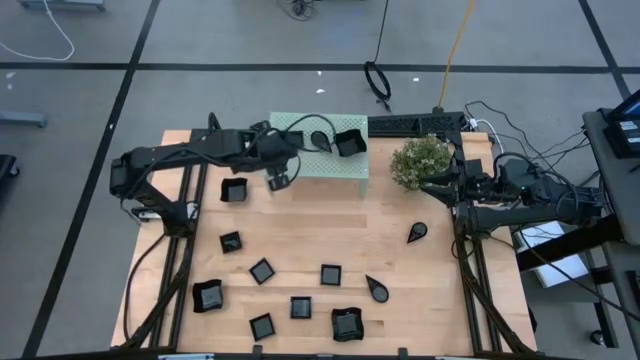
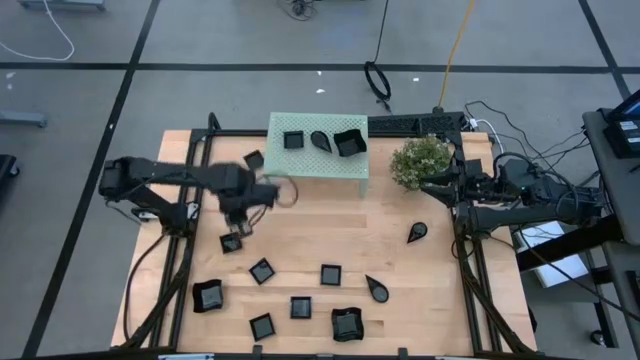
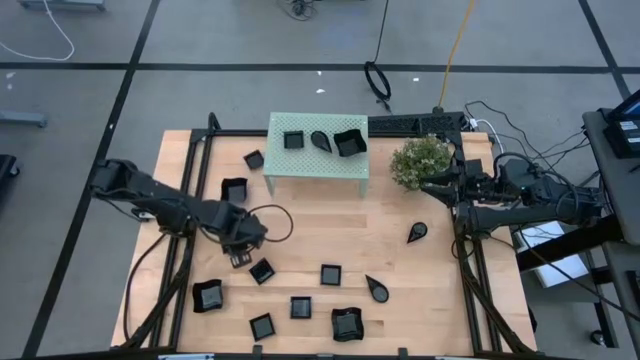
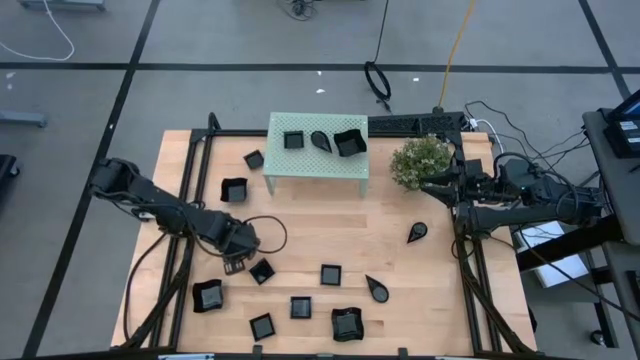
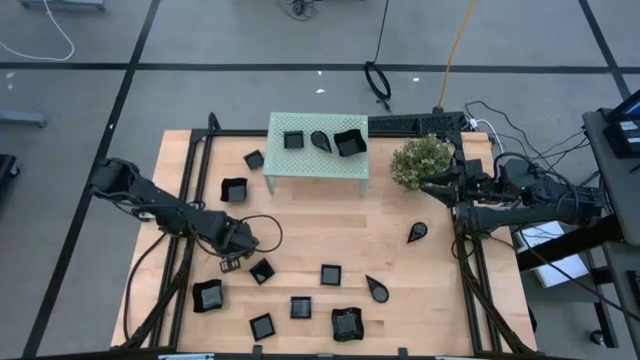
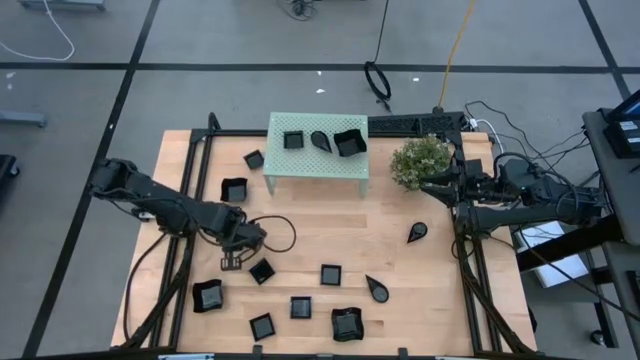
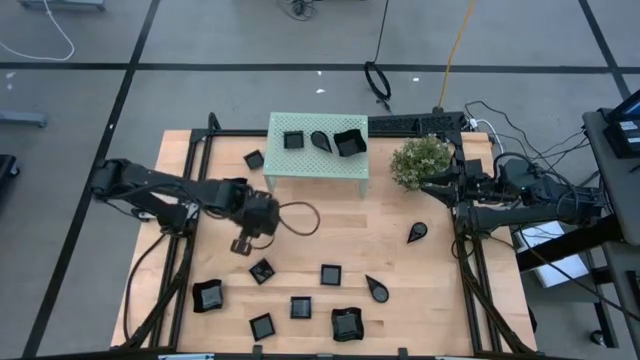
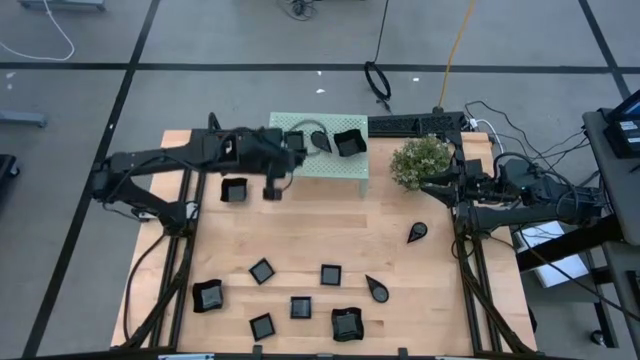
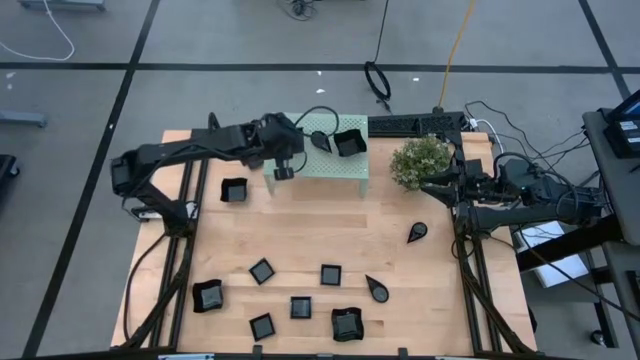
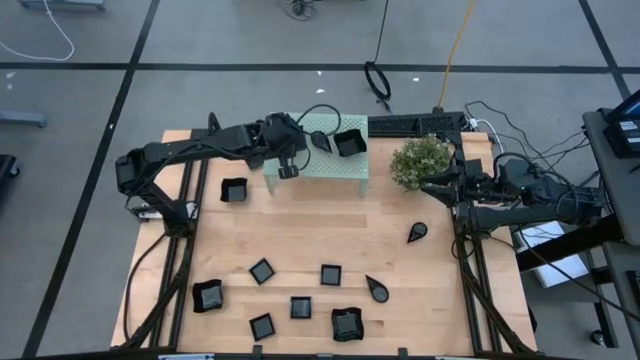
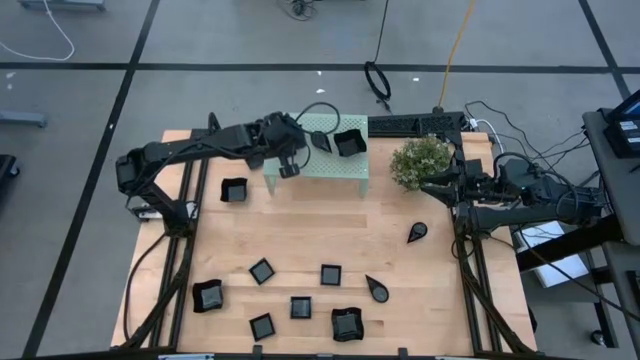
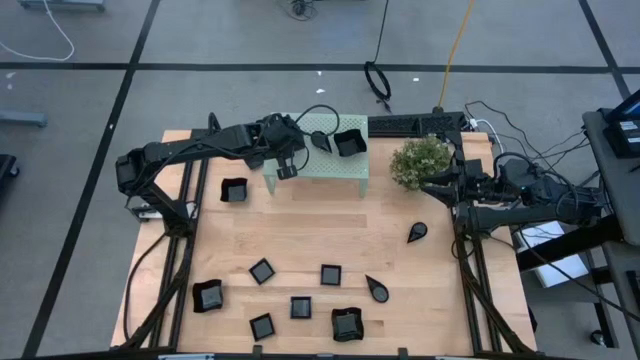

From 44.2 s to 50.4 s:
Task: Pick & Place Mini shaped plates
Stack the black square plate on top of the other black square plate on the shelf

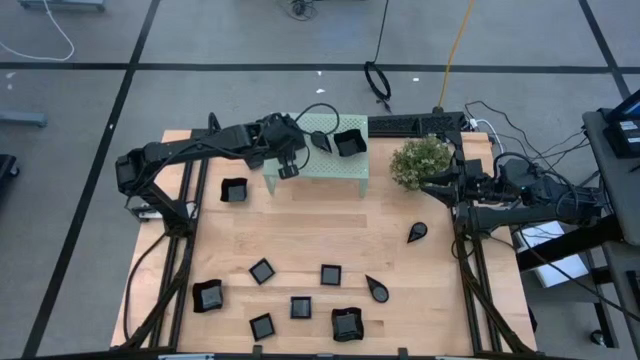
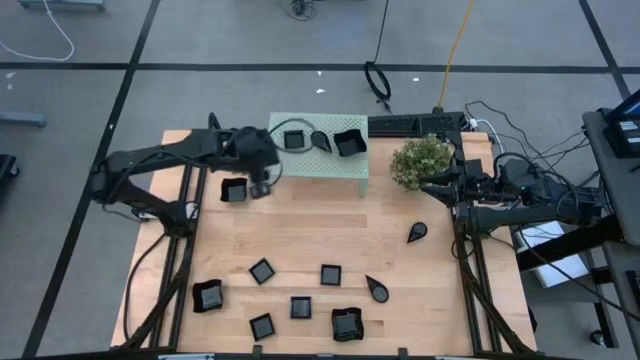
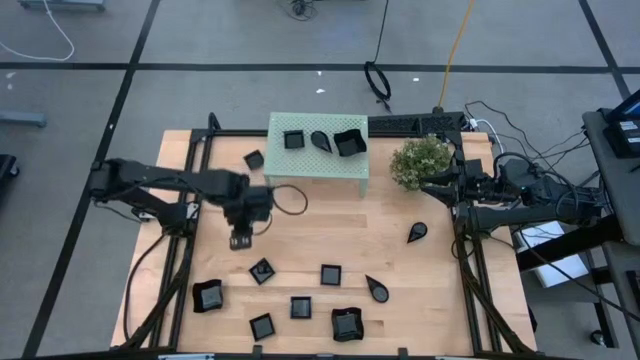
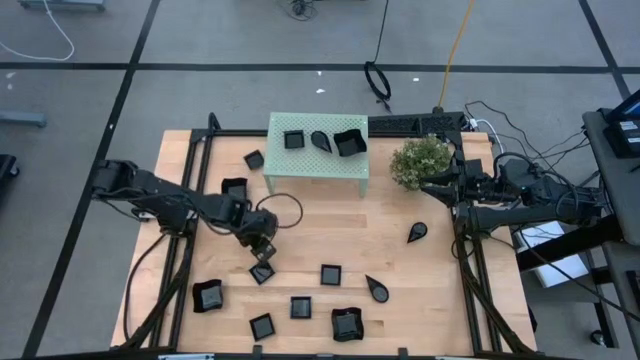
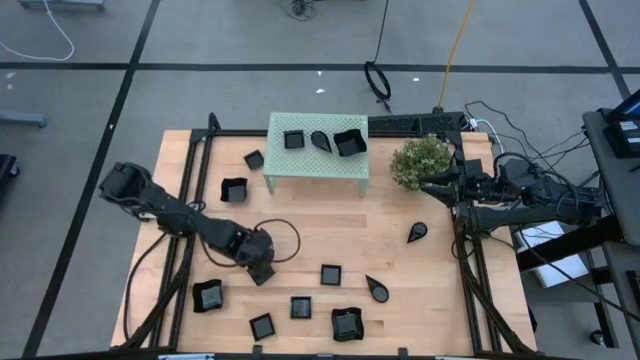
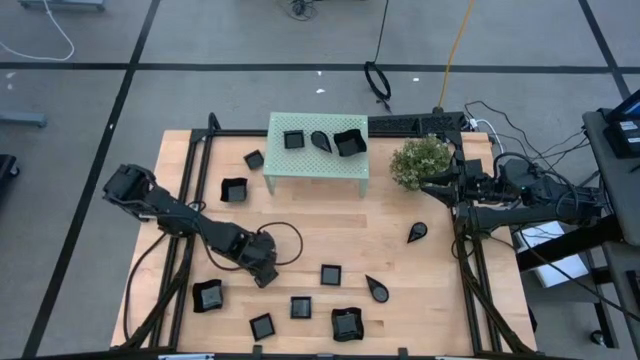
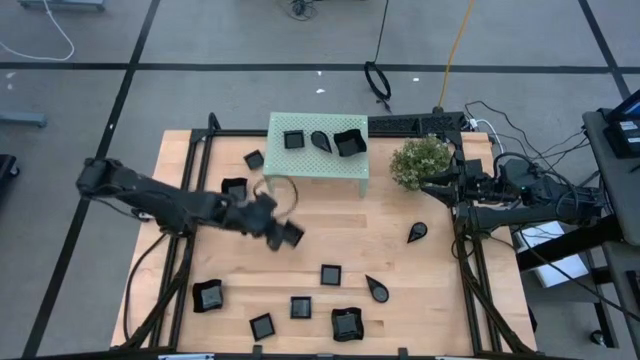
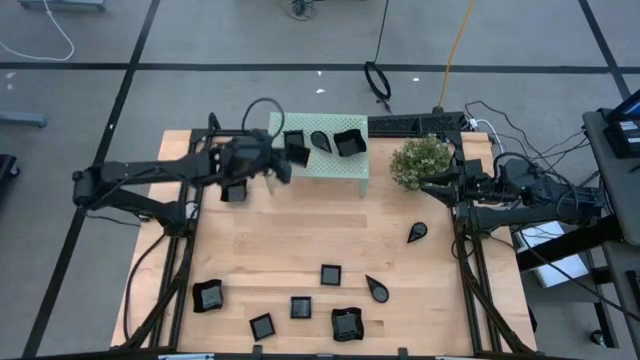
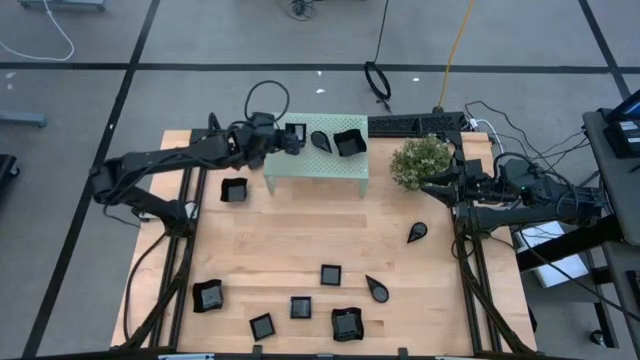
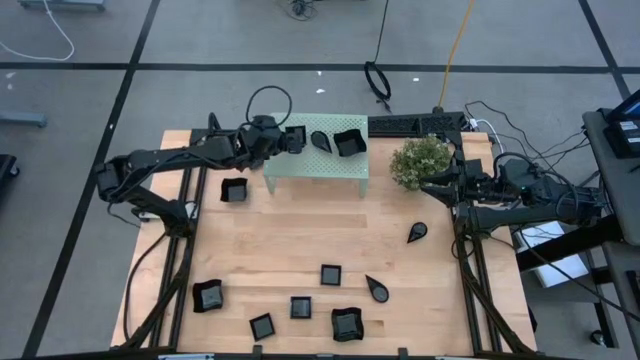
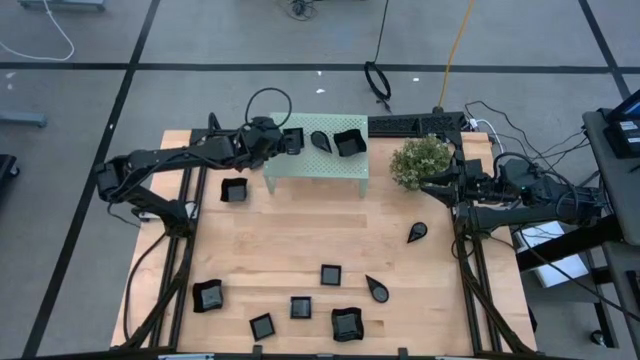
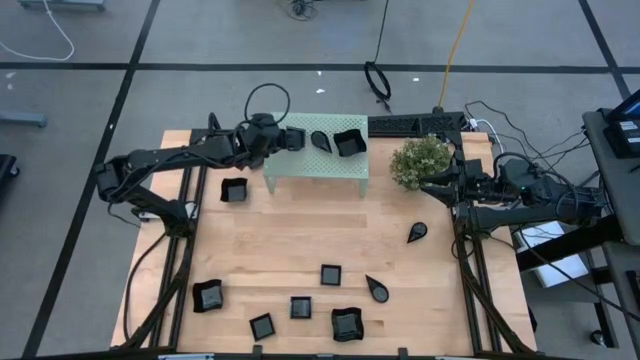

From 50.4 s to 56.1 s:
Stack the black square plate on top of the other black square plate on the shelf

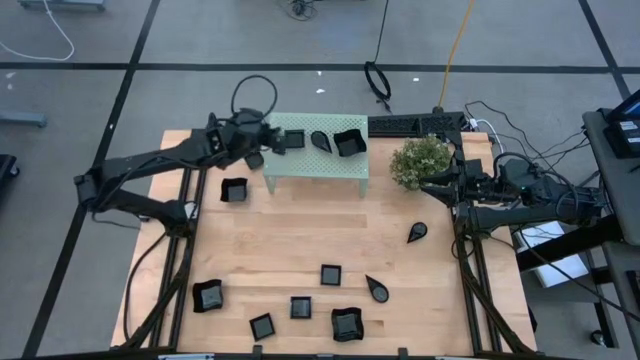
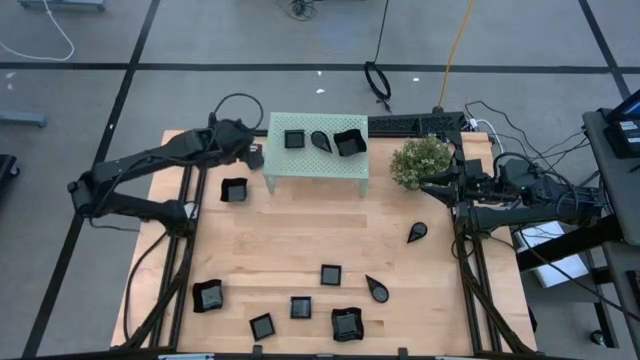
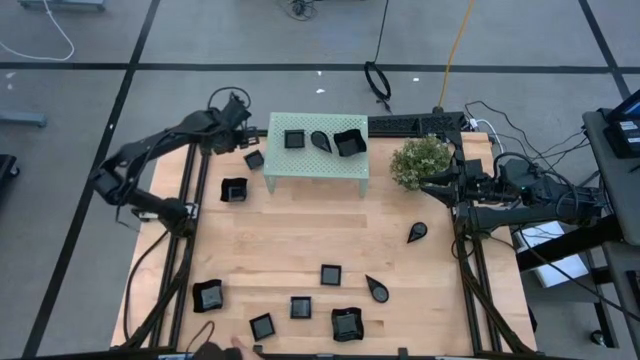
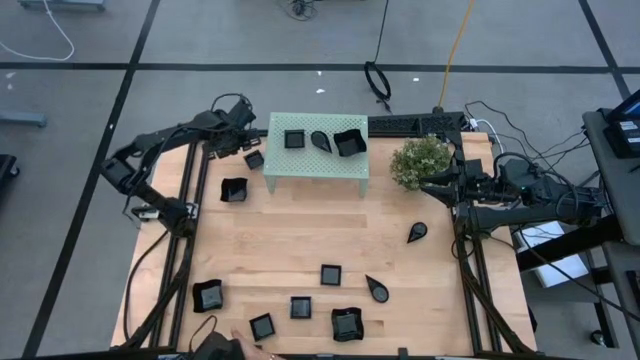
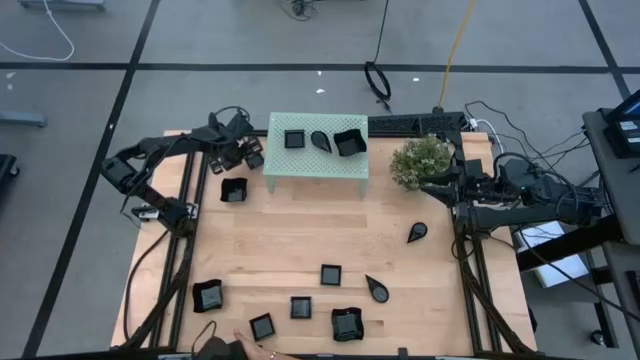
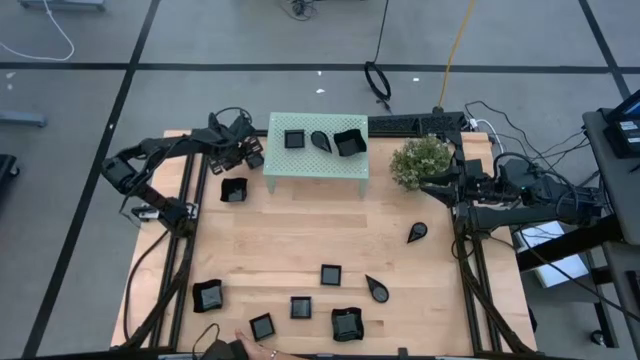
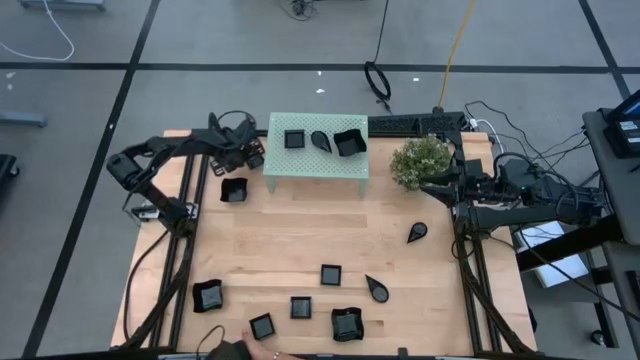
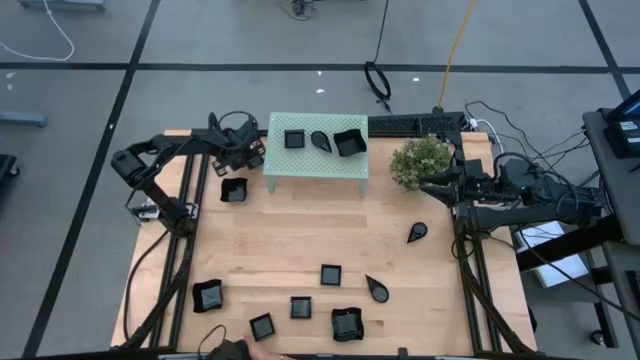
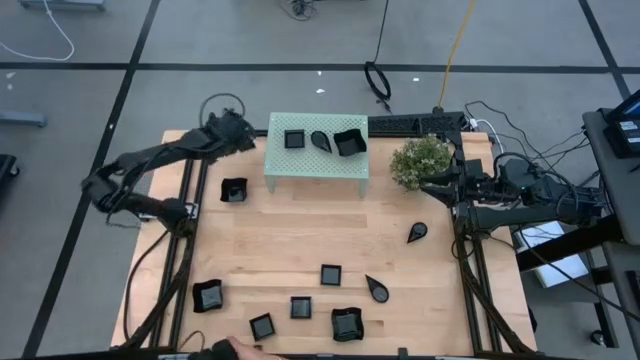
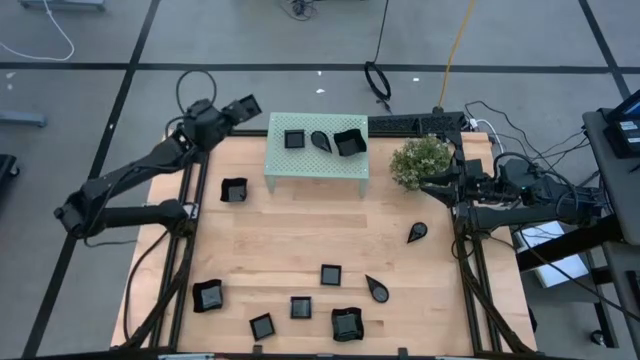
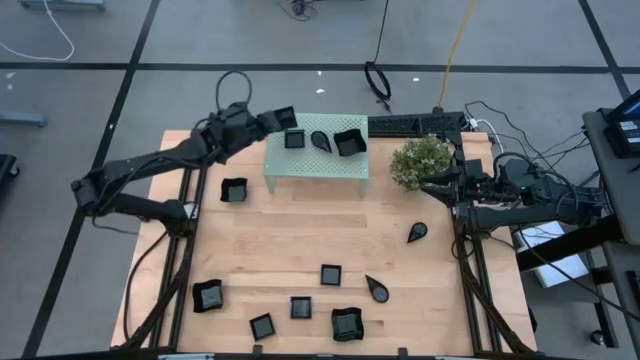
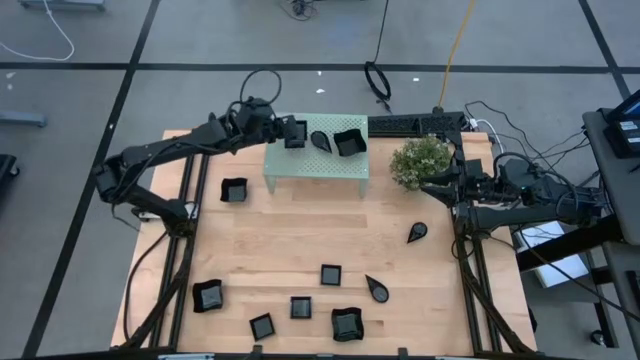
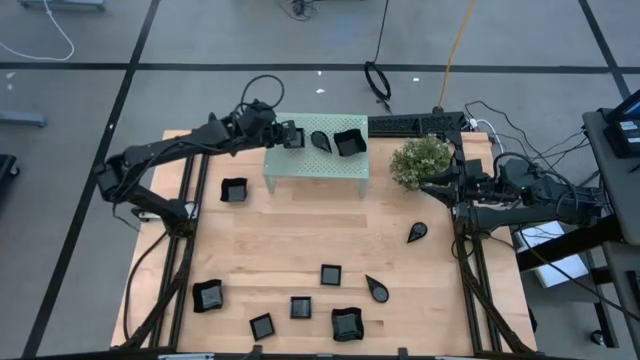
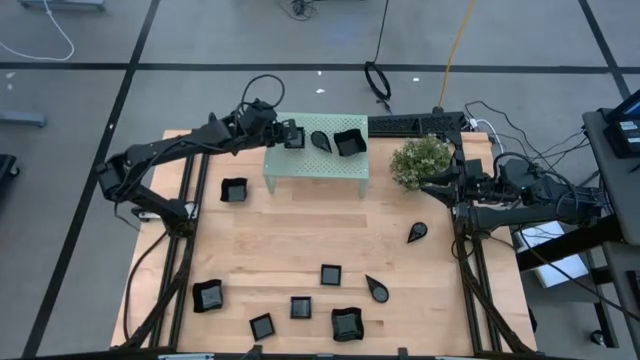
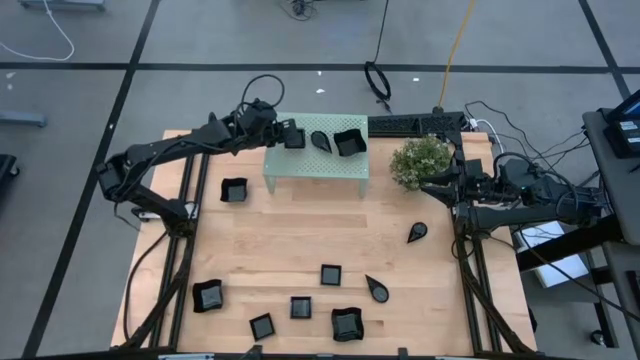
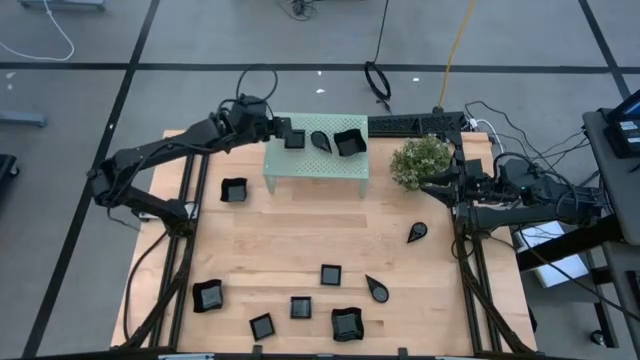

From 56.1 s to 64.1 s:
Stack the black square plate on top of the other black square plate on the shelf
